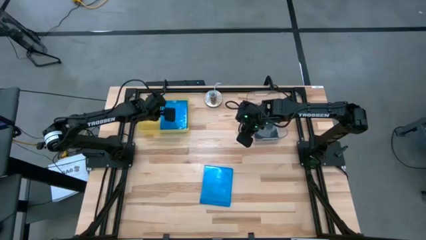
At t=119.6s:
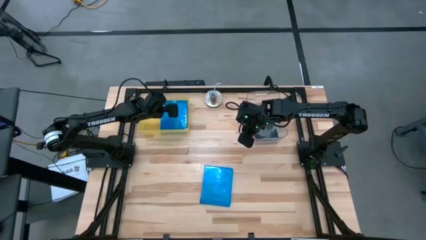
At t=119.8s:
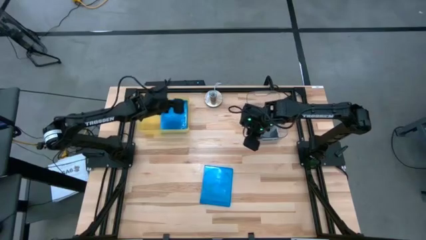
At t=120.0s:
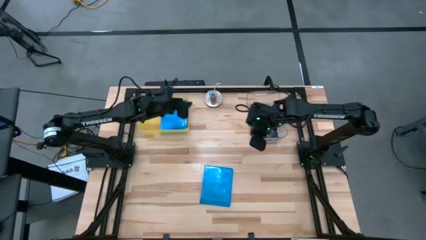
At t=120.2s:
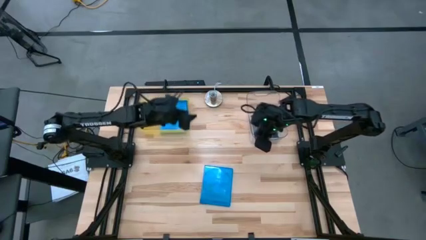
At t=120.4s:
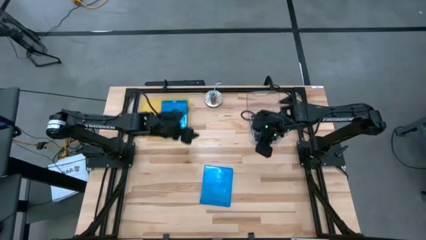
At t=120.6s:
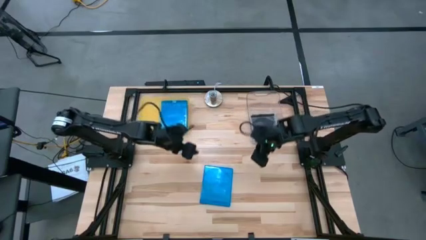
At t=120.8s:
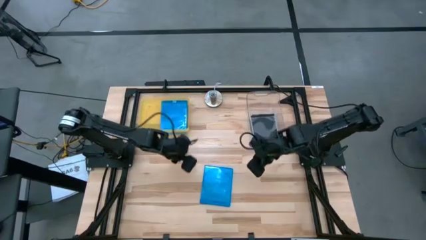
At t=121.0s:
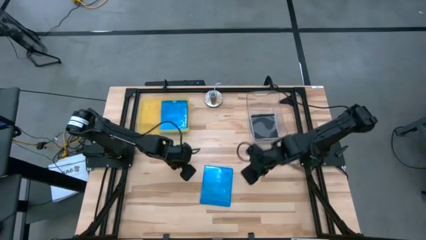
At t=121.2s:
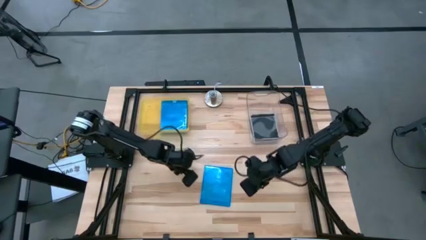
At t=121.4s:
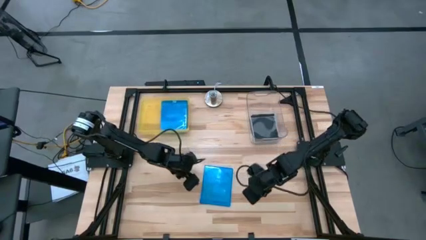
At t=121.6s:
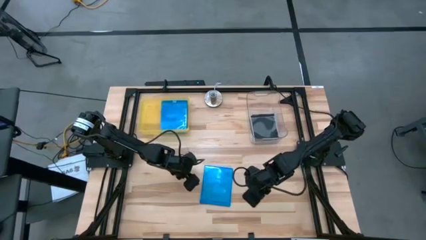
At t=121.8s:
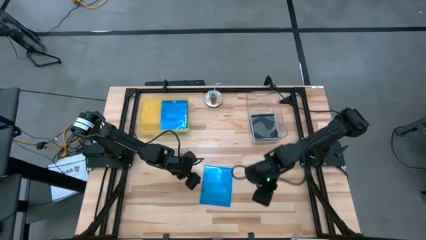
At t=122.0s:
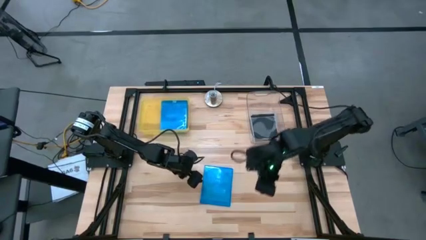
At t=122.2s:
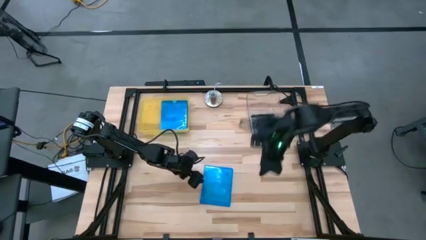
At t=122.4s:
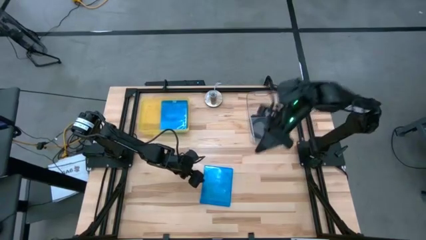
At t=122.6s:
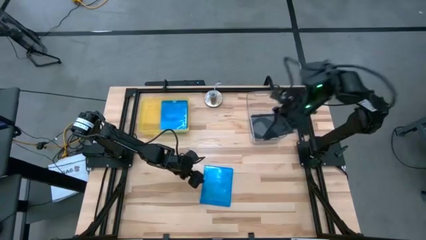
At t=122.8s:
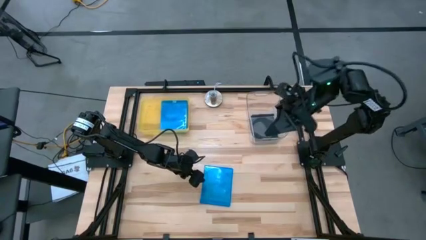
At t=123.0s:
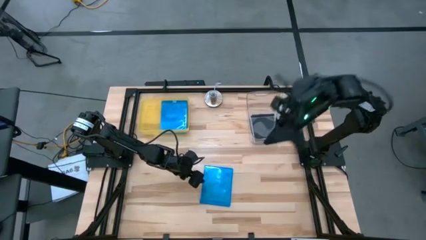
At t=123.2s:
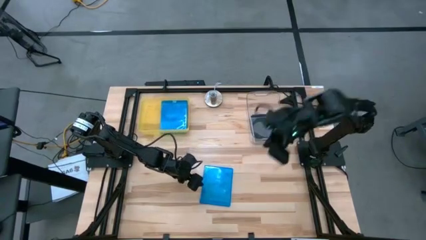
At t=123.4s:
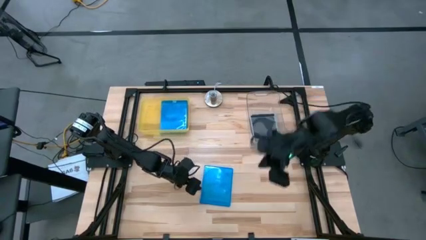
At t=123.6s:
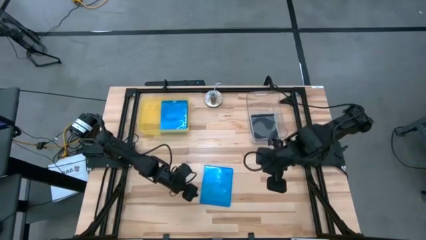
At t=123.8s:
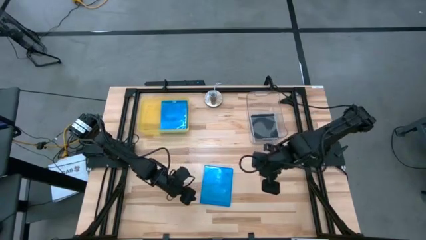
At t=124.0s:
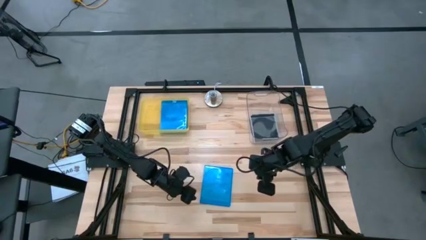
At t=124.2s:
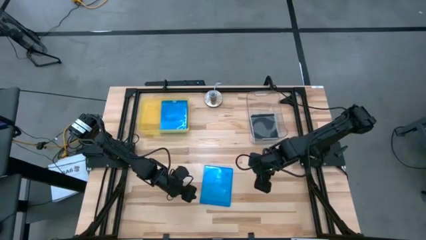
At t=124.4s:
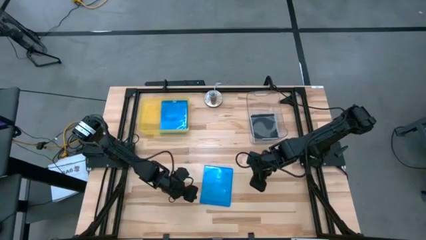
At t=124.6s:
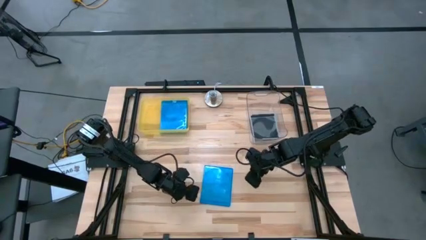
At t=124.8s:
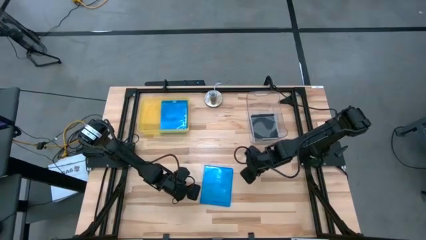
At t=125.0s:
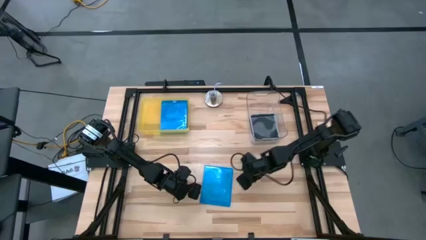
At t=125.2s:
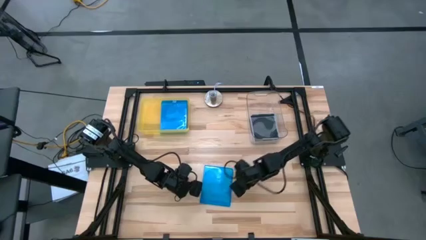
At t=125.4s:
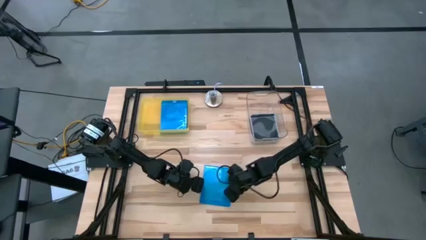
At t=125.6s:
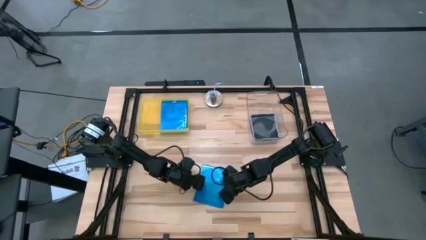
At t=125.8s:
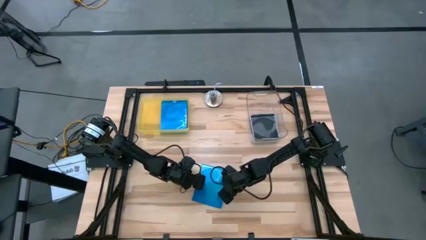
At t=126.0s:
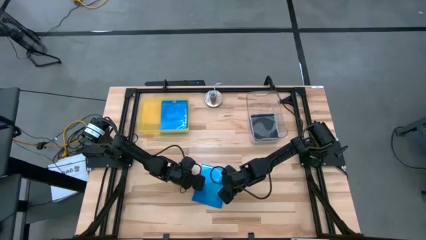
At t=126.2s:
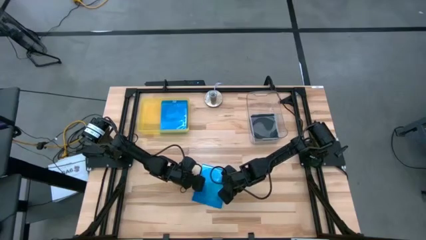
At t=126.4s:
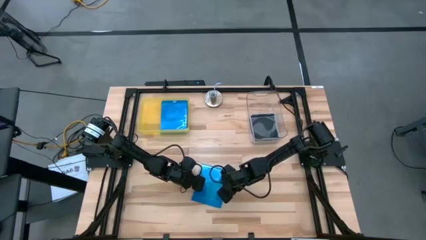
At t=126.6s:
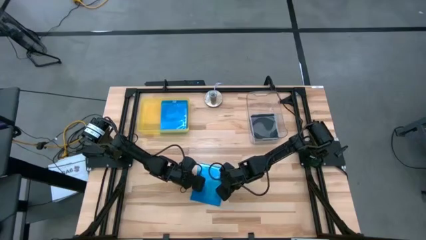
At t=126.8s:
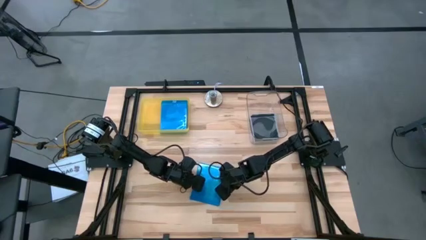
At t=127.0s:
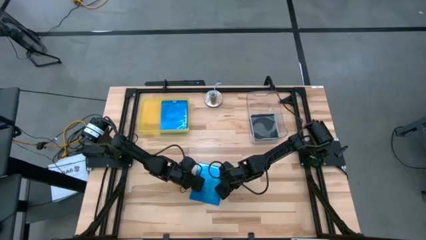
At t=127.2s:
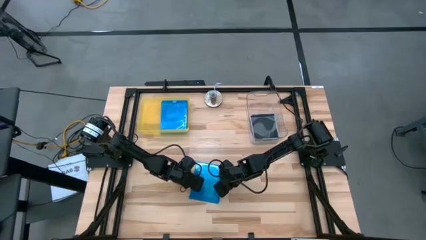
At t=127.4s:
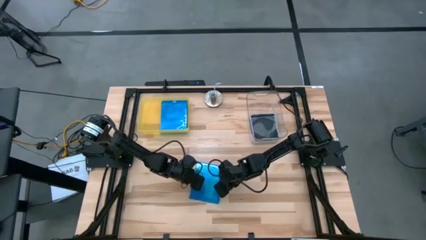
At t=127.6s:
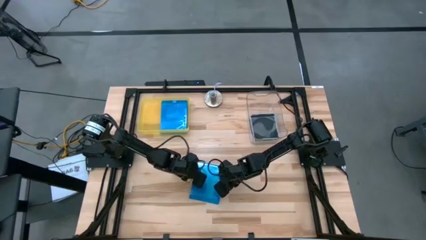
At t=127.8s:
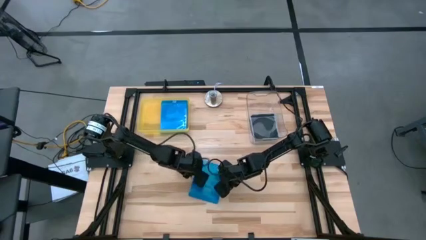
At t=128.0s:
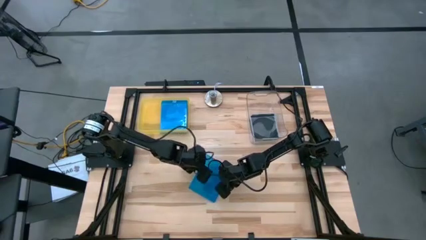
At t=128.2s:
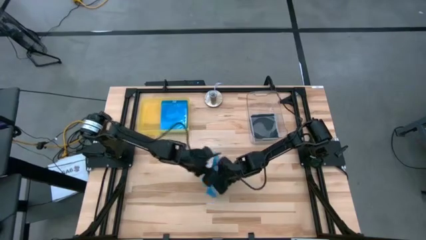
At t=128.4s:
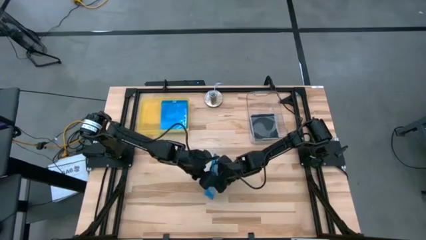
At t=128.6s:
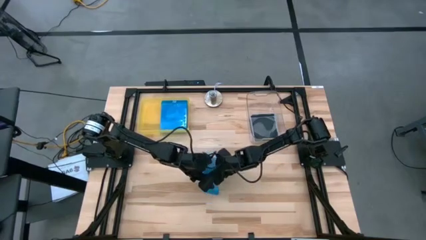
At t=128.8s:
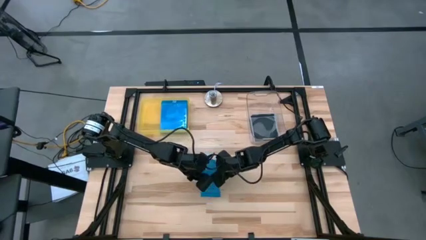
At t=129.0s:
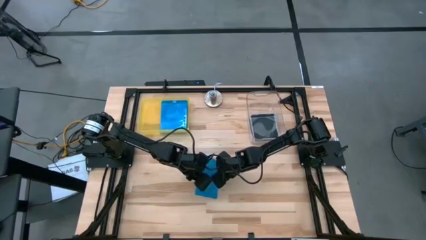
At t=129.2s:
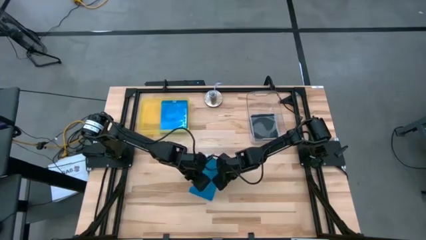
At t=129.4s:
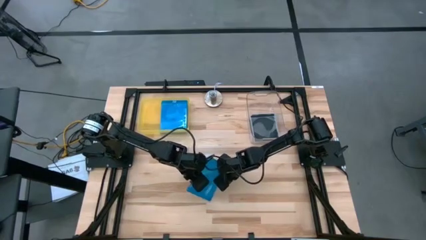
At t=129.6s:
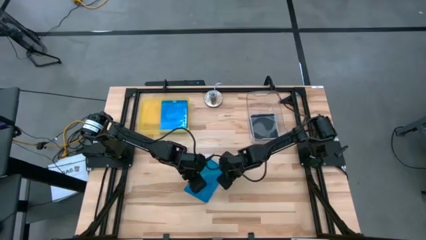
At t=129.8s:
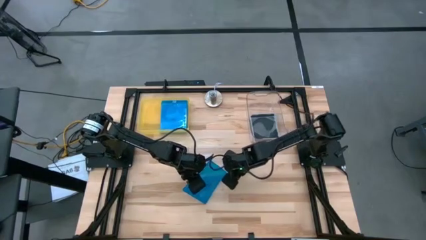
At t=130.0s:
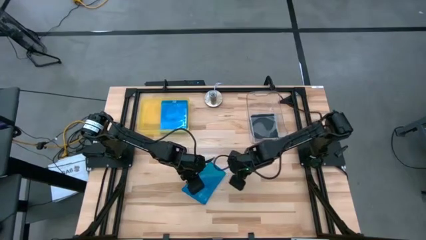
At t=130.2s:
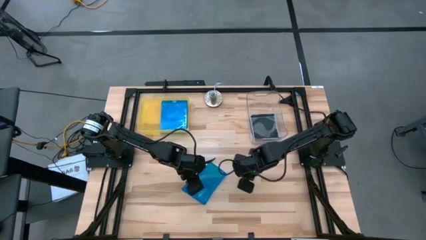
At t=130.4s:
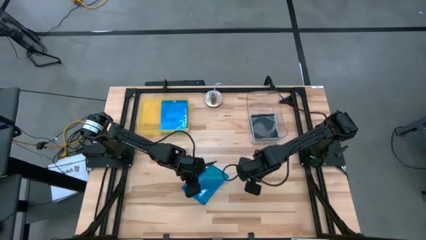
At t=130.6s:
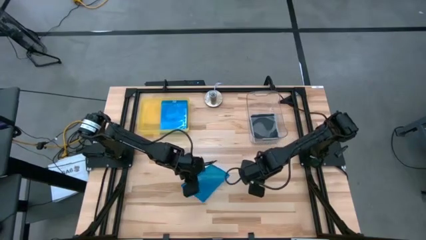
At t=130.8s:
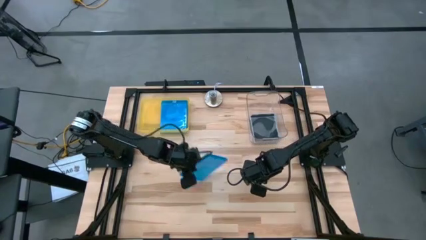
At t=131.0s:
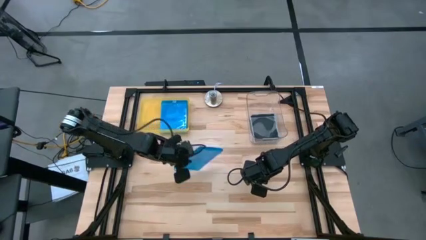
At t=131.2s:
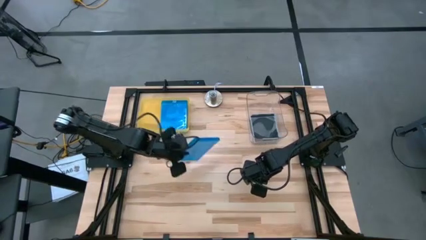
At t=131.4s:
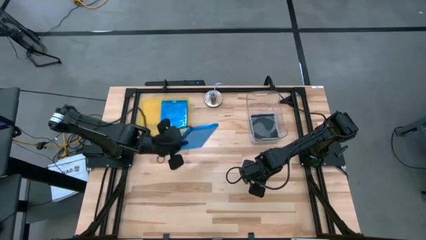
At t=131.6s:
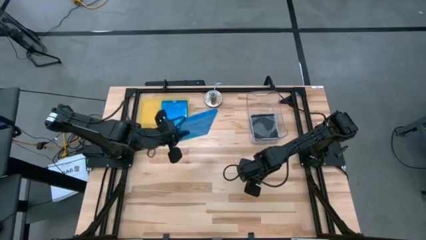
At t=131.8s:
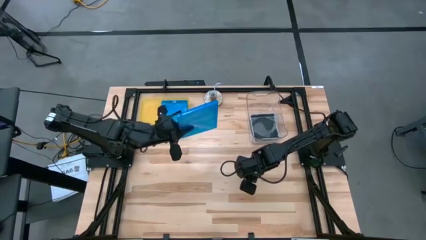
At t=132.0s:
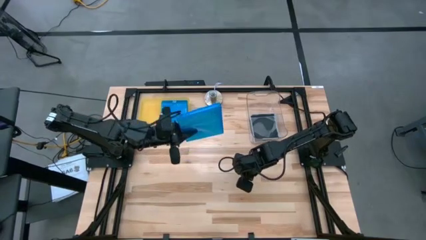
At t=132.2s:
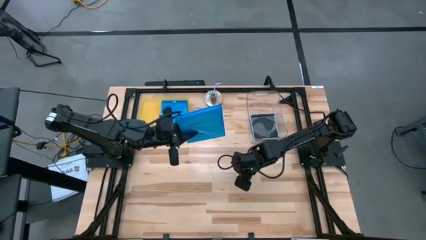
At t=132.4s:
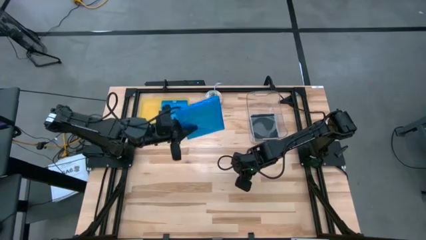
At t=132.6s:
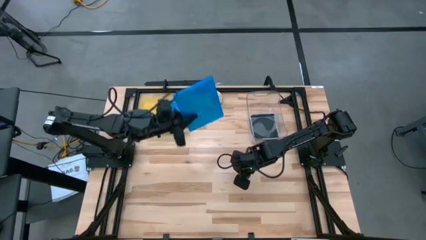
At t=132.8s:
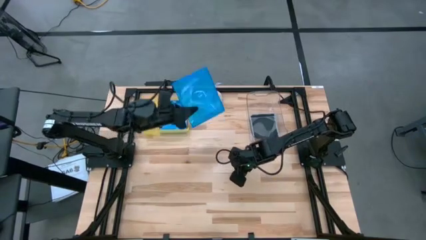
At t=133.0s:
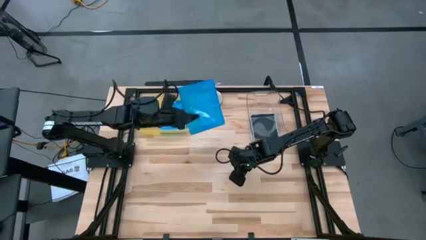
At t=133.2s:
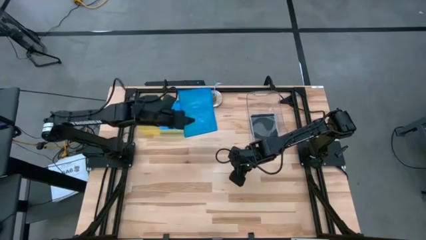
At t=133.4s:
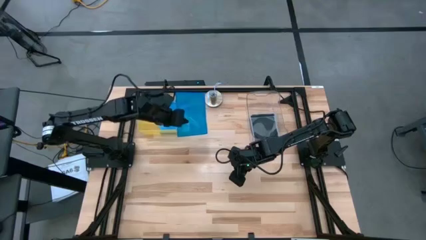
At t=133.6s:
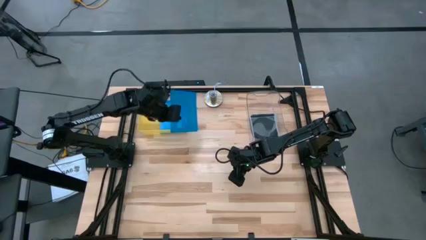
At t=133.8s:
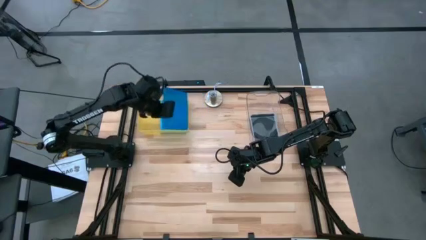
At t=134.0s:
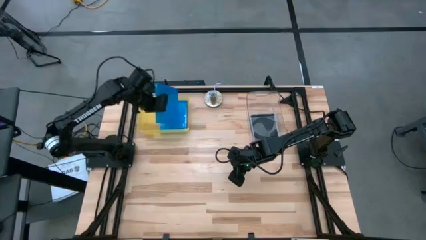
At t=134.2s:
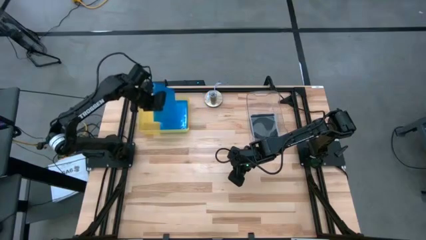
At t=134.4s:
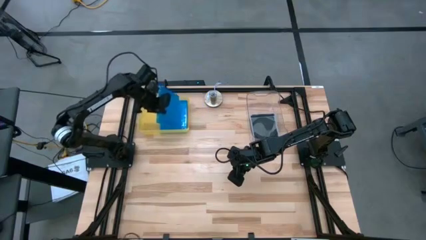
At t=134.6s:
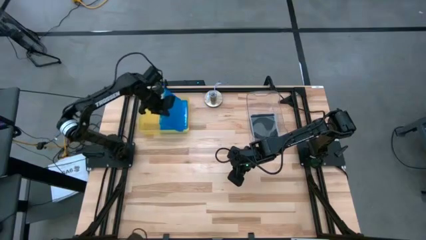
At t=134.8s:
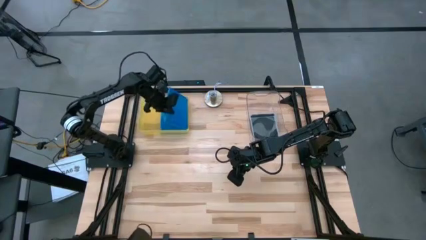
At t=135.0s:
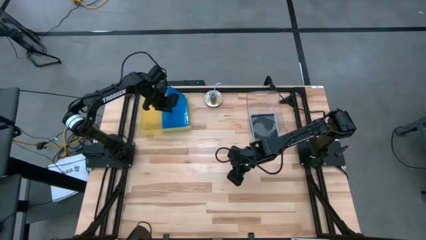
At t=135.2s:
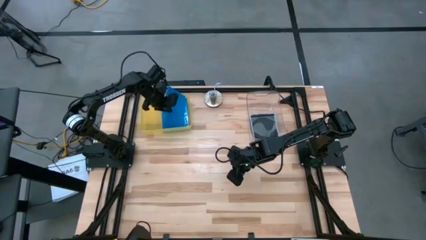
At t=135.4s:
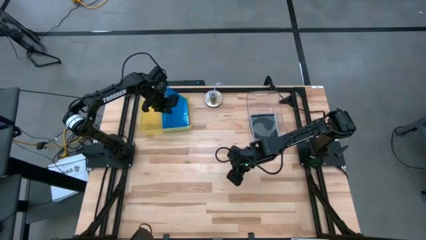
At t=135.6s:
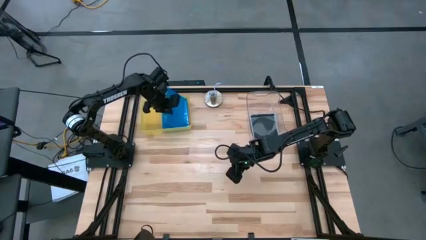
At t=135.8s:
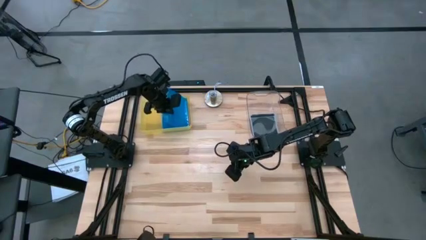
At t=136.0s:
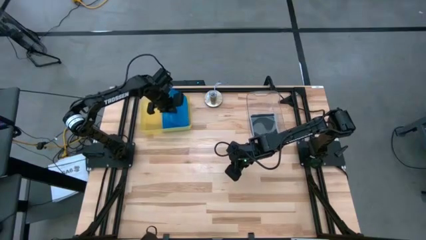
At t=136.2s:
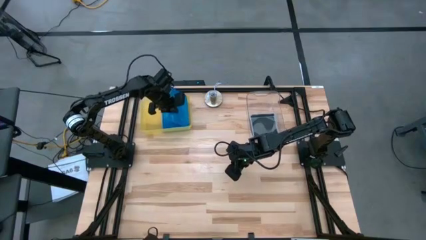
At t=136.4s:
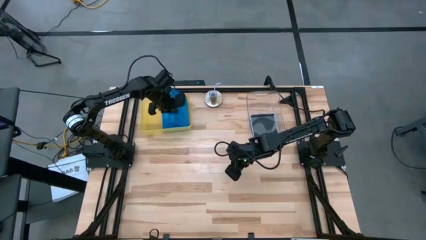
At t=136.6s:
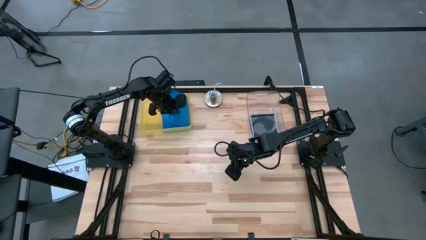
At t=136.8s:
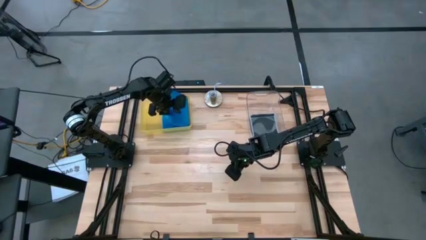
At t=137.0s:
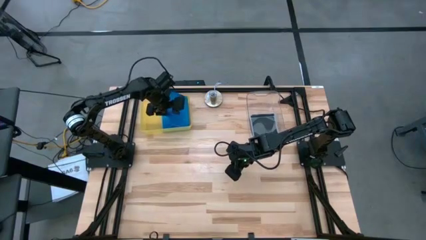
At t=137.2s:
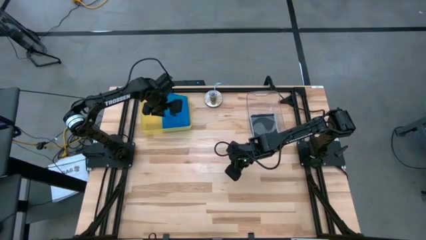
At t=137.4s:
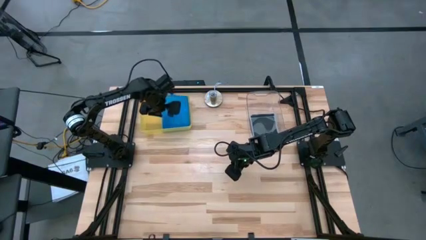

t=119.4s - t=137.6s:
Task: Pick & place jewel cases by type
Put the blue CD case into the yellow bin
